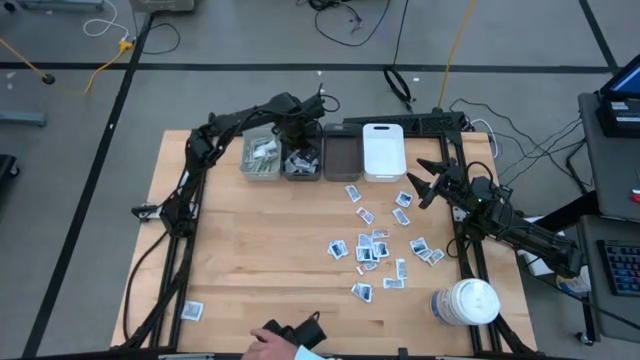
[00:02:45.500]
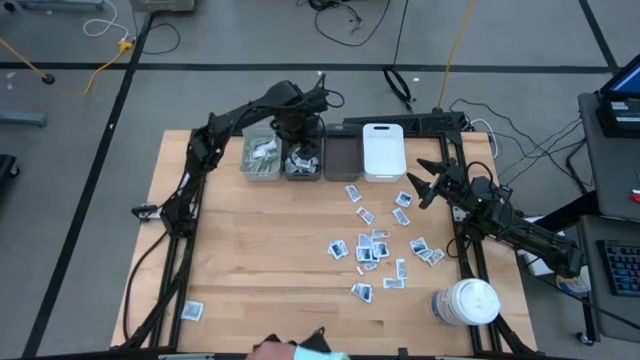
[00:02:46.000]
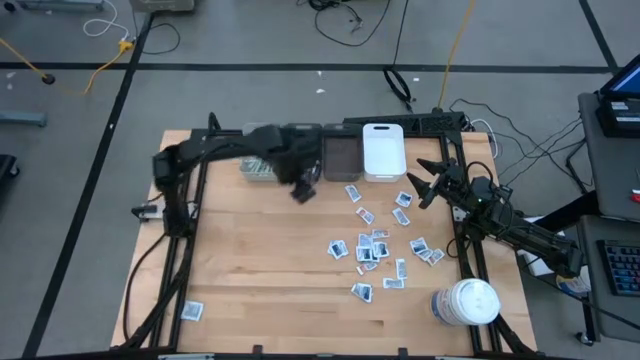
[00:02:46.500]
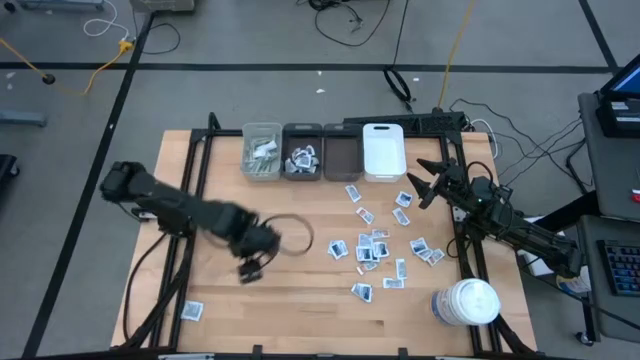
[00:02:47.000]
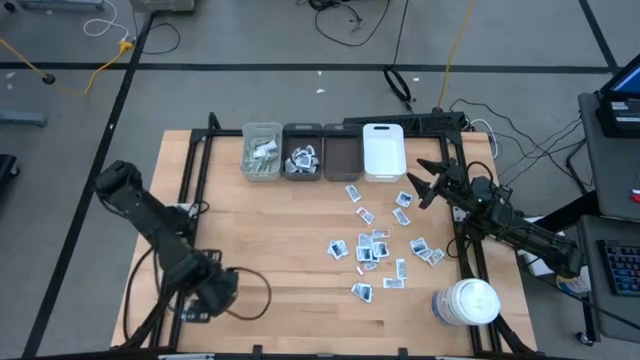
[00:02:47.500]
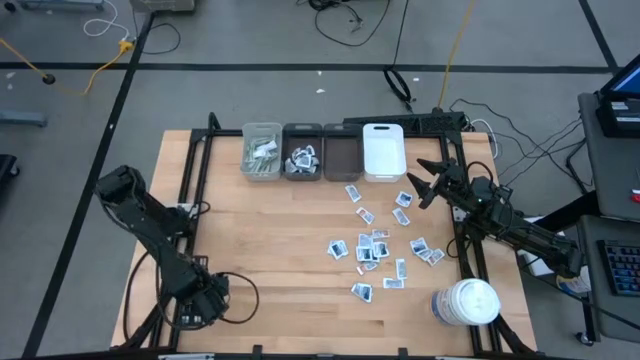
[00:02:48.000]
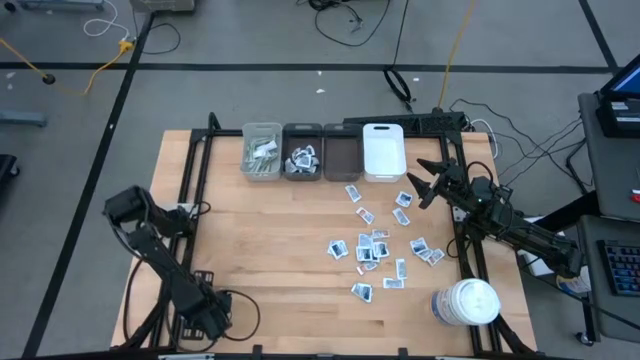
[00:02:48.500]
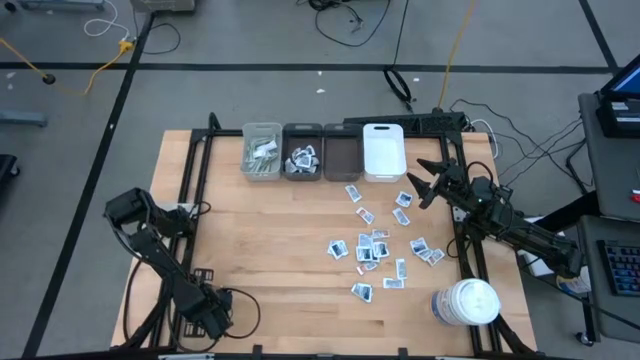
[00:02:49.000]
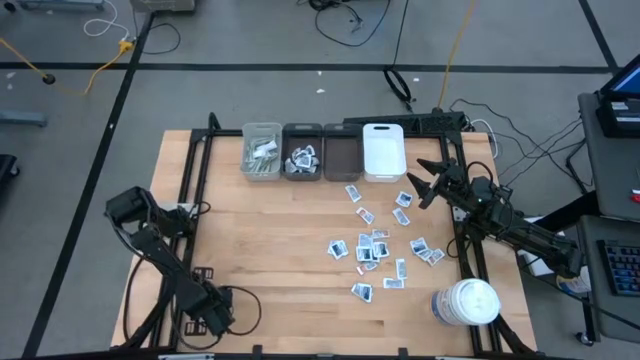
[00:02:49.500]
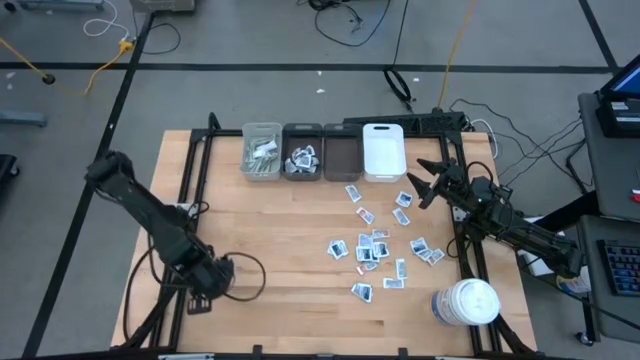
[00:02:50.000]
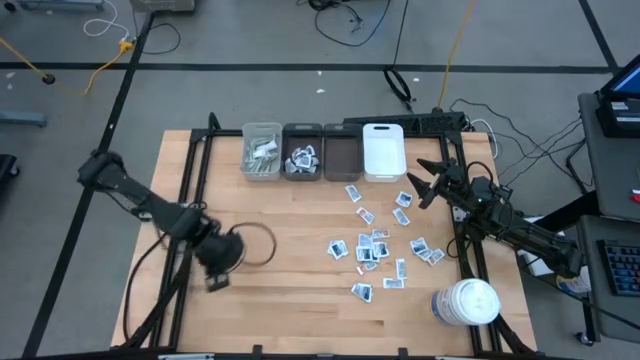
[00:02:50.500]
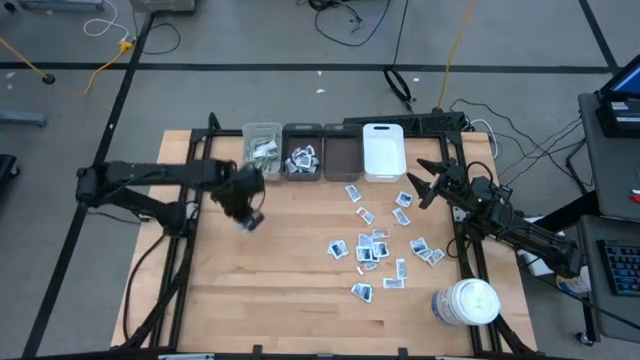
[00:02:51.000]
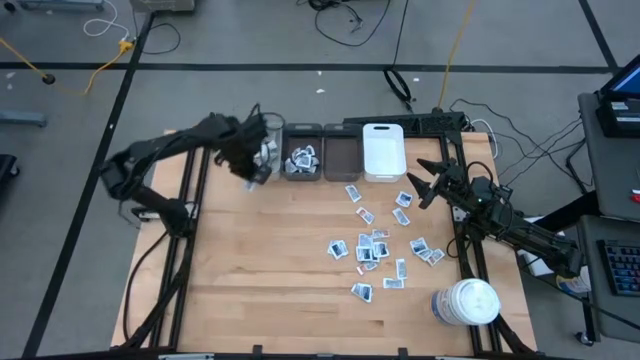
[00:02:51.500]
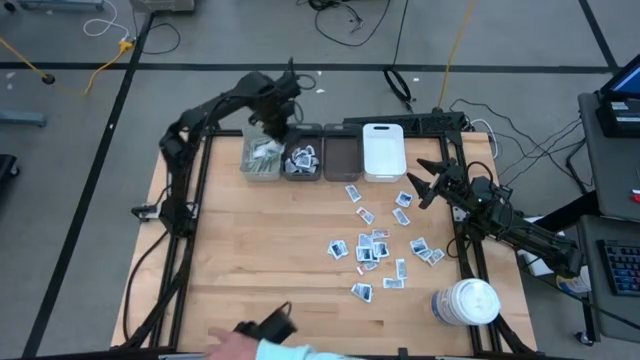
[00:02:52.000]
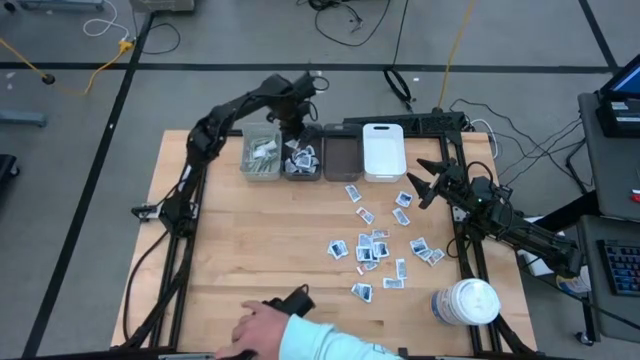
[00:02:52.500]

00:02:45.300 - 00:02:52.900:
Task: Pick & Place First Aid Supplies
Put the towelette pack into the left black bin

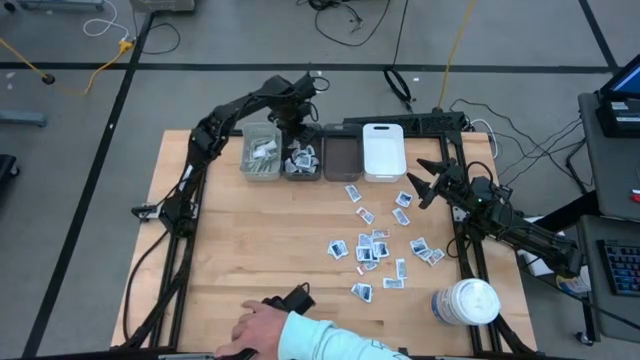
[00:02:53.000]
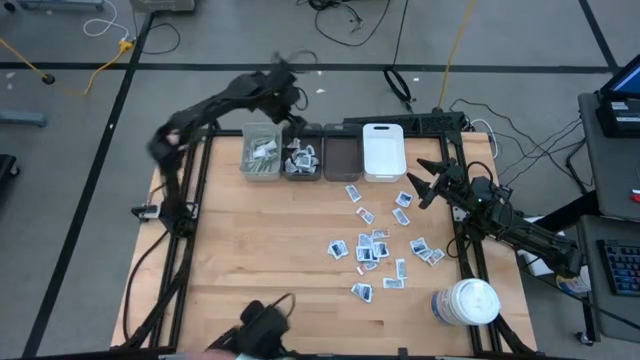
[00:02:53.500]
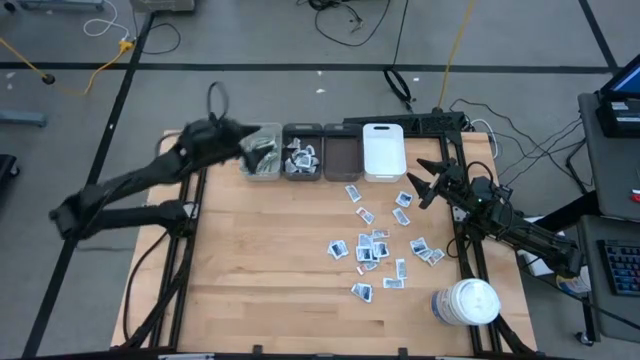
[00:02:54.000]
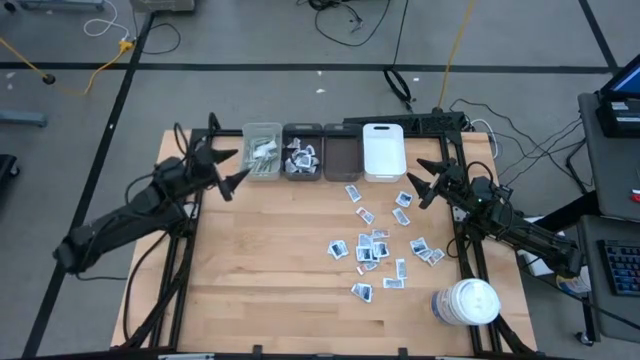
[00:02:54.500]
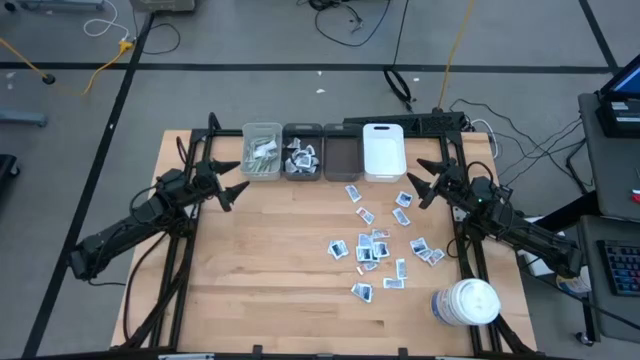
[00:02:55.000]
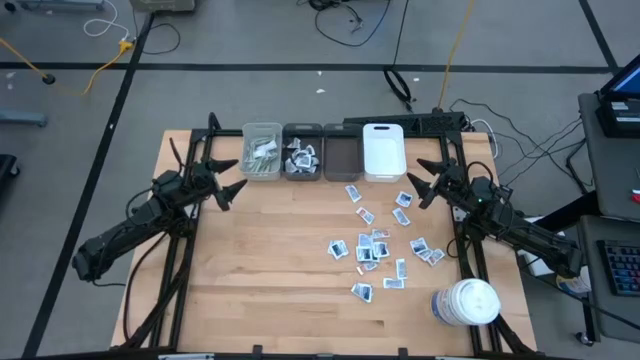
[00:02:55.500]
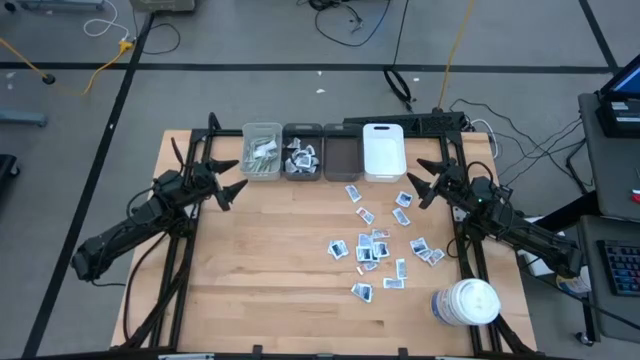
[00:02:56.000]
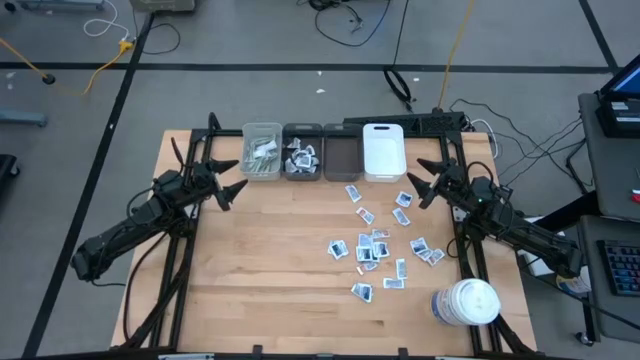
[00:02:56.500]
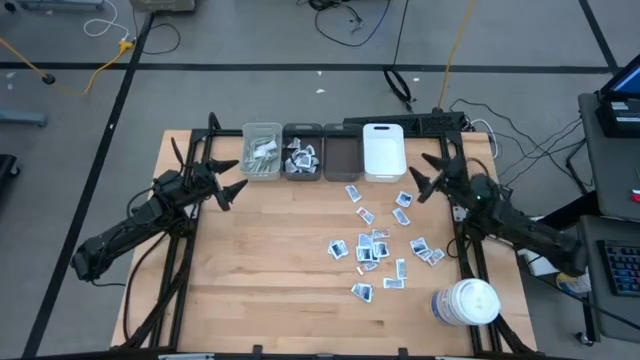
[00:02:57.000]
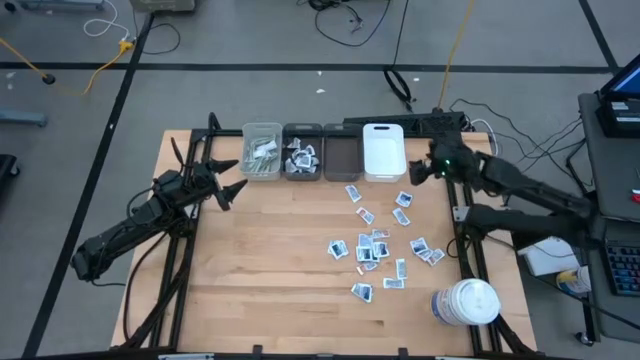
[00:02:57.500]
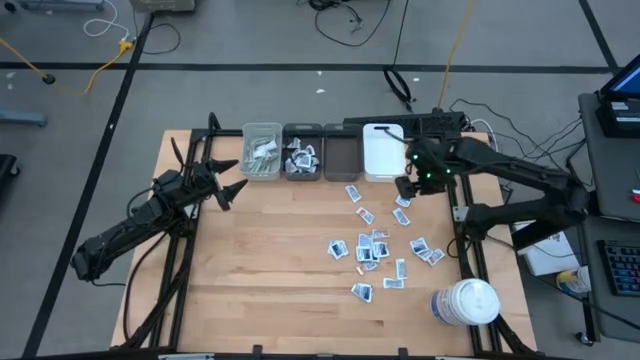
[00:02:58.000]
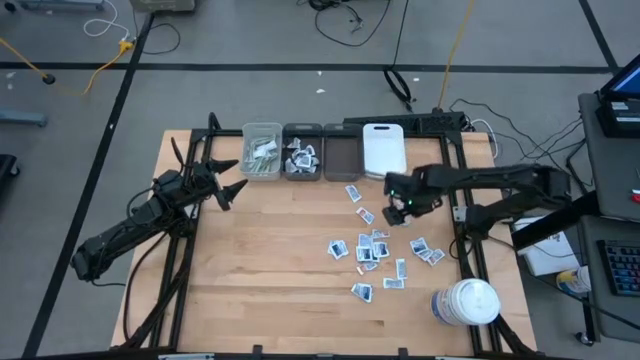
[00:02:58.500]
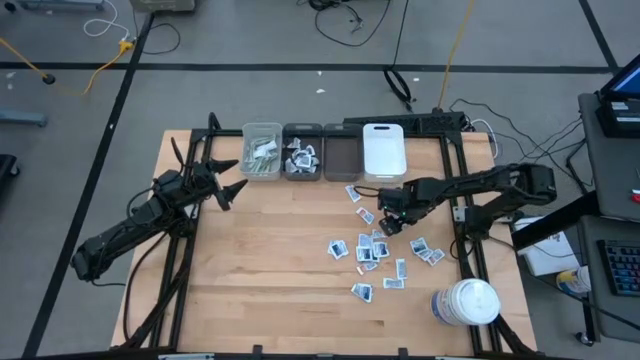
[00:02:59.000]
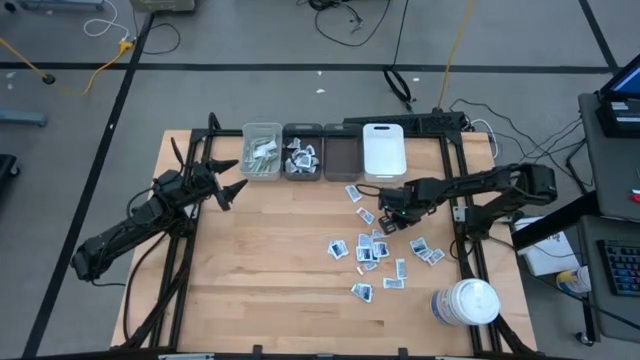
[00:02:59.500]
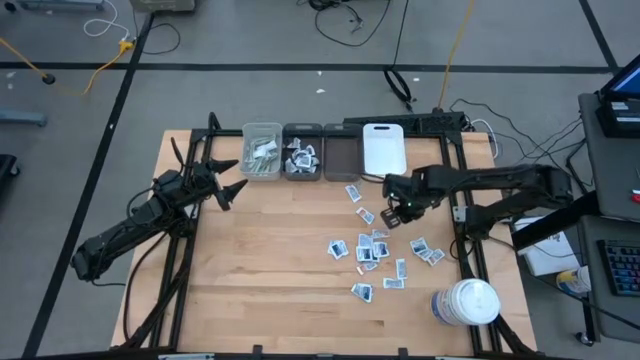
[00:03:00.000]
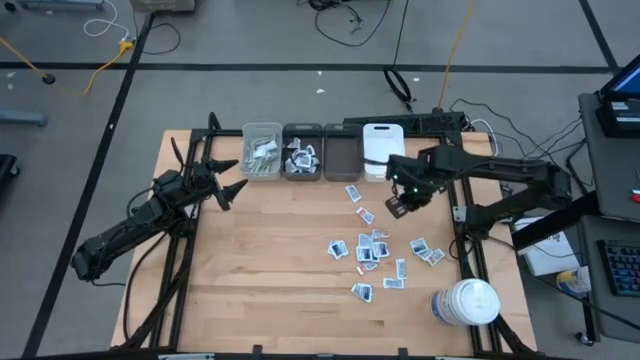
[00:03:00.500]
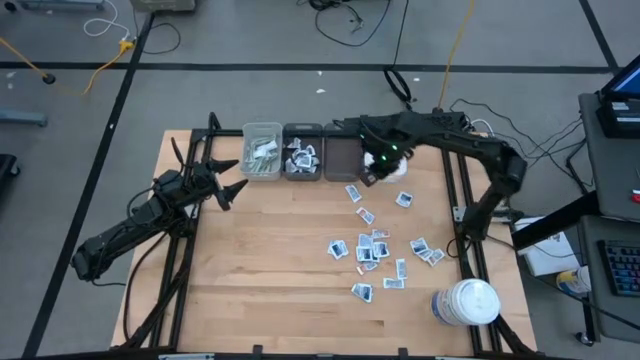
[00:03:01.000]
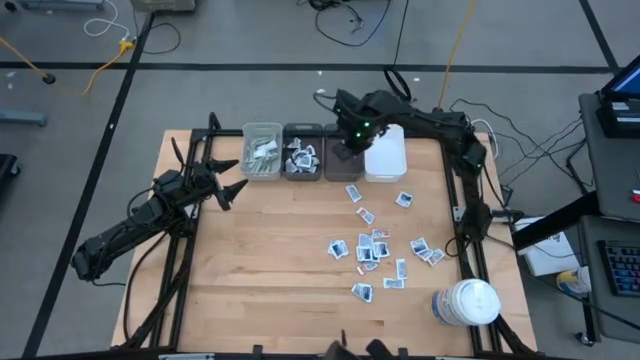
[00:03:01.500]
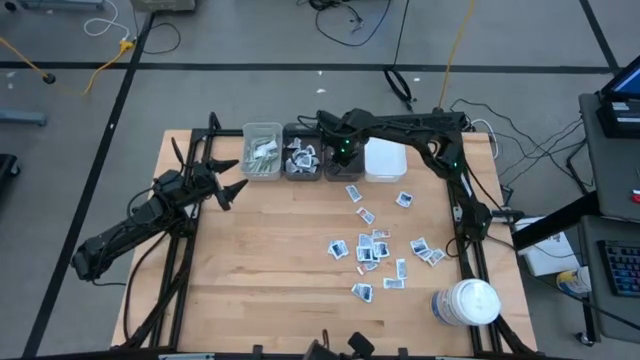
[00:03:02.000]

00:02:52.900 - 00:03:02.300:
Put the ointment pack into the right black bin

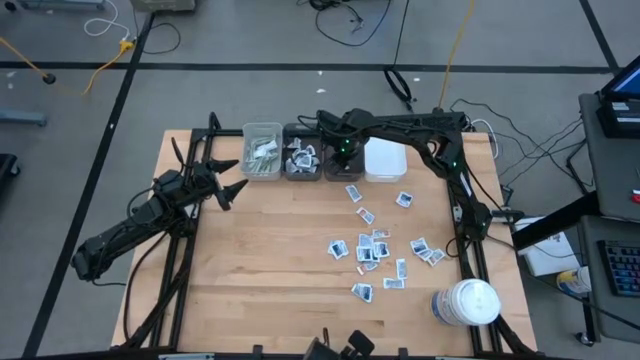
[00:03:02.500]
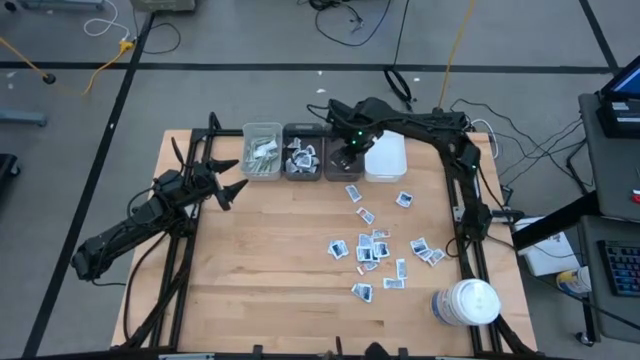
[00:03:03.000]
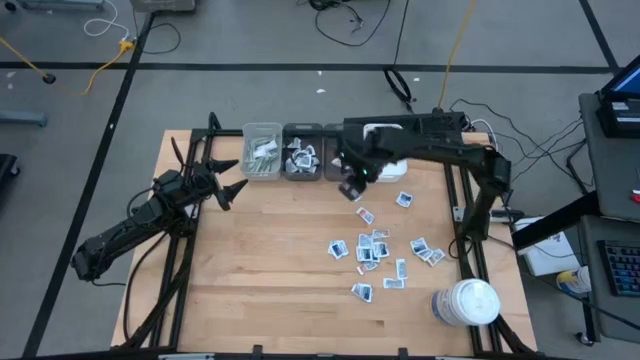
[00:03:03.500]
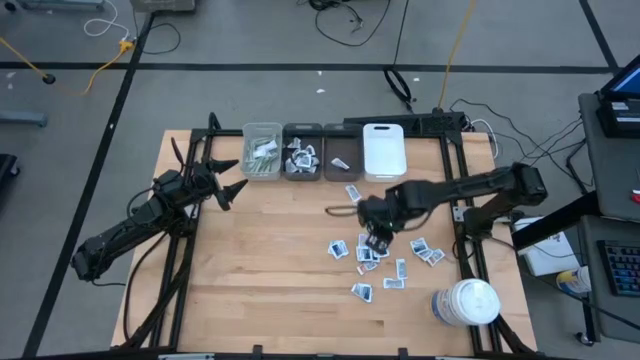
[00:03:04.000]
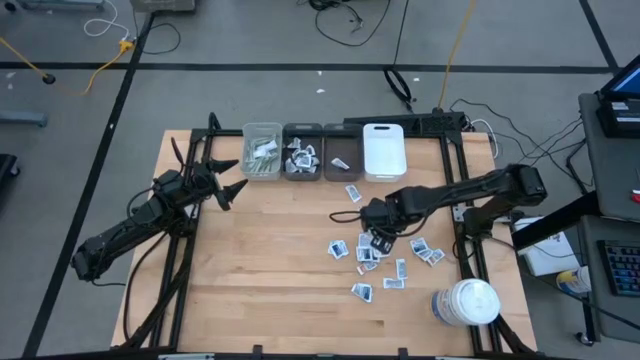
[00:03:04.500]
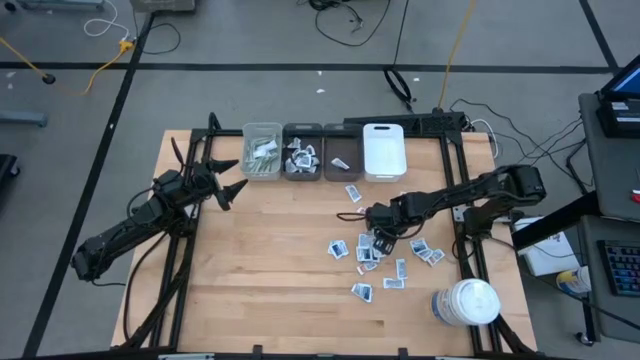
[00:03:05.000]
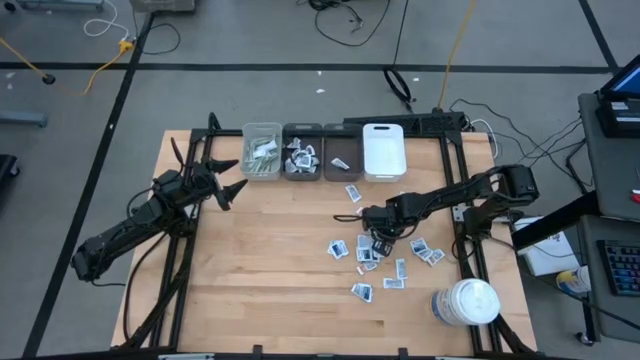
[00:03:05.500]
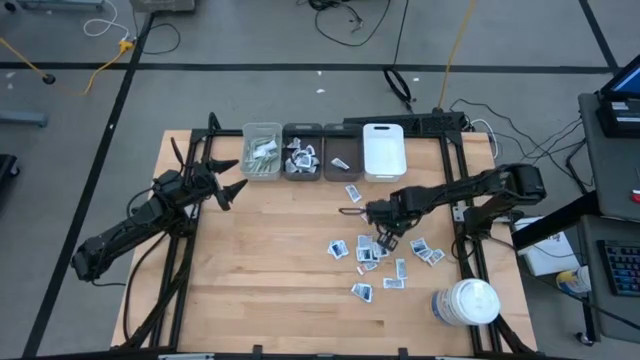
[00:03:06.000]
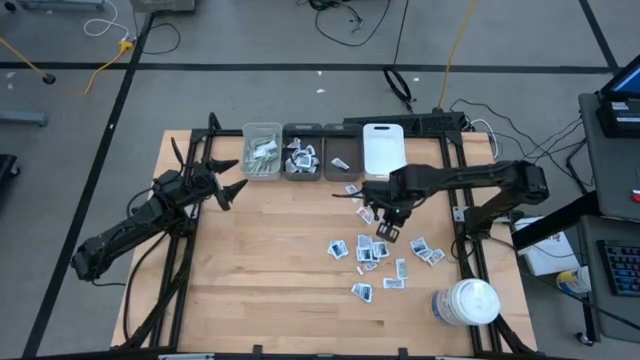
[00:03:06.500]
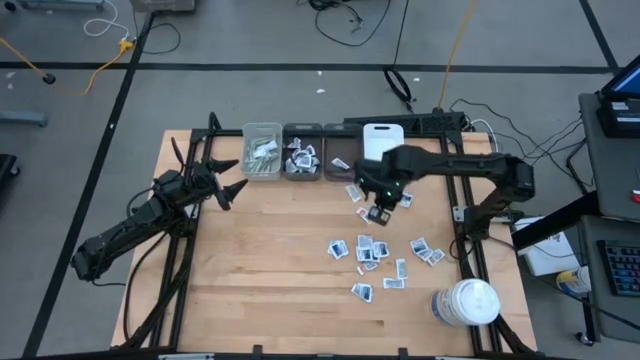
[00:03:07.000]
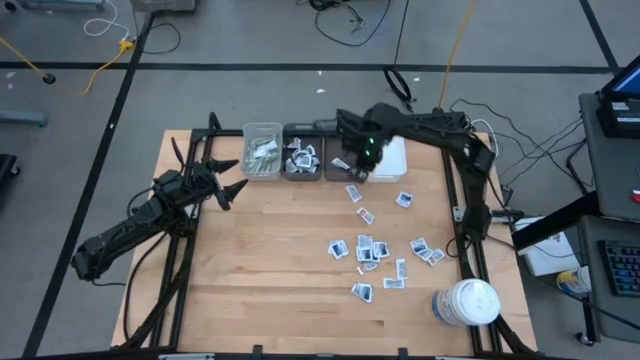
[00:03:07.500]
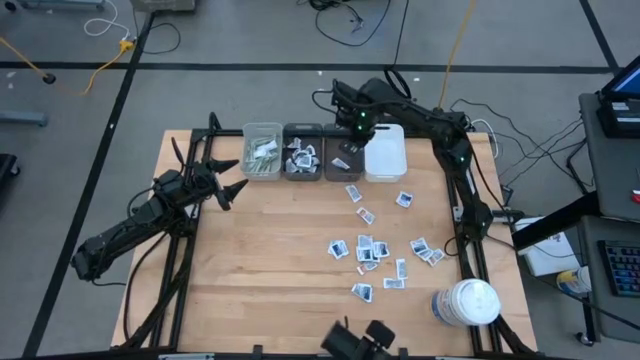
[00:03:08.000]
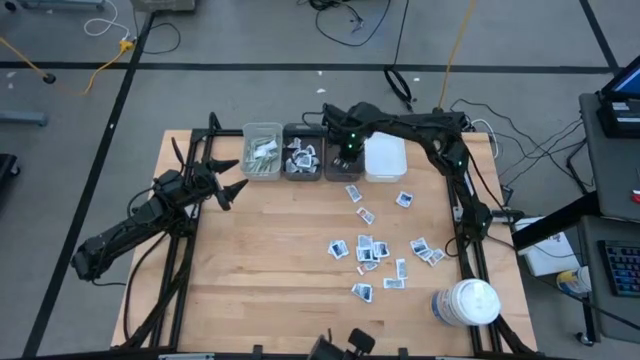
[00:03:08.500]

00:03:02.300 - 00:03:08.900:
Put the ointment pack into the right black bin
